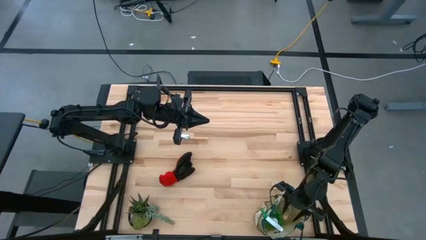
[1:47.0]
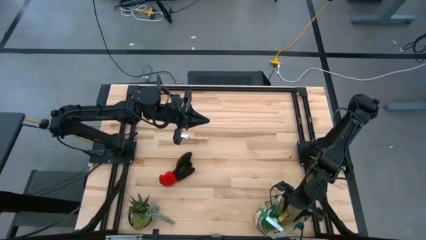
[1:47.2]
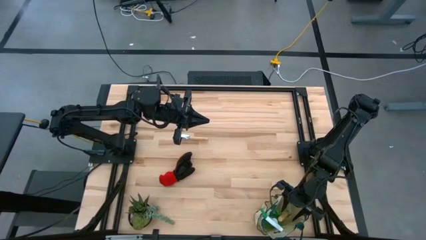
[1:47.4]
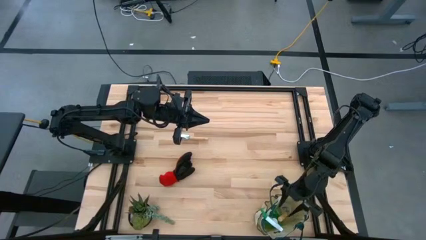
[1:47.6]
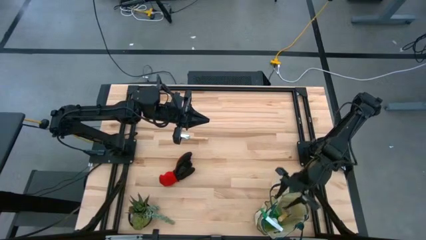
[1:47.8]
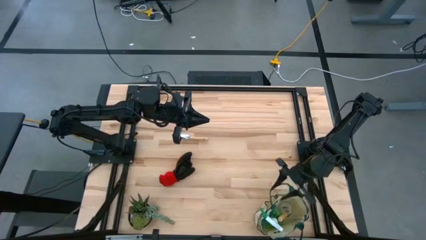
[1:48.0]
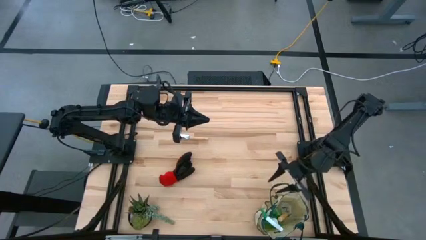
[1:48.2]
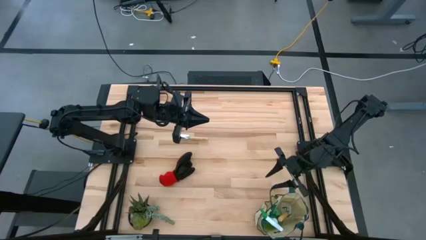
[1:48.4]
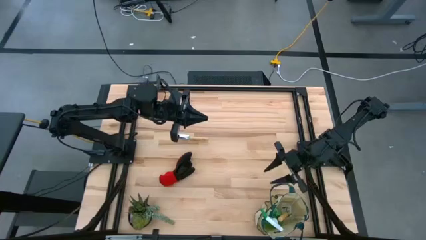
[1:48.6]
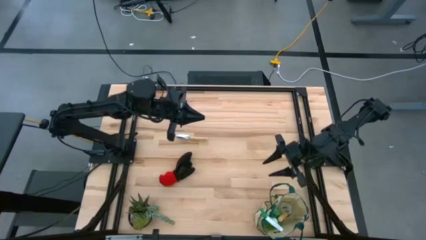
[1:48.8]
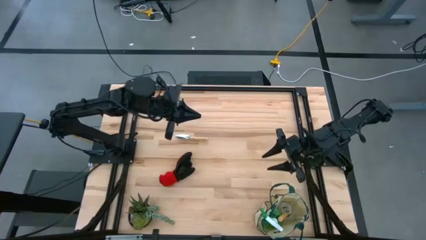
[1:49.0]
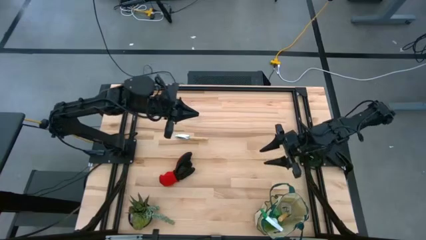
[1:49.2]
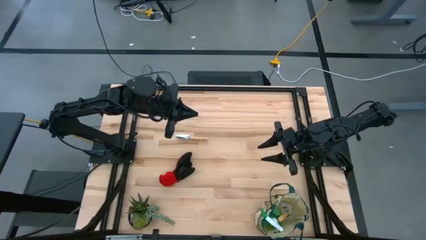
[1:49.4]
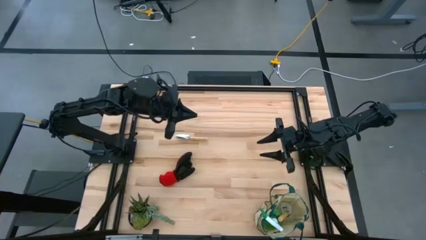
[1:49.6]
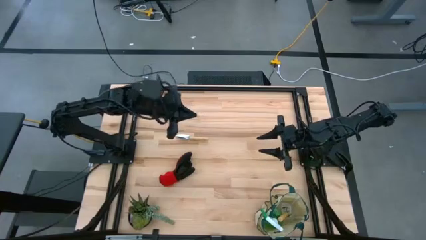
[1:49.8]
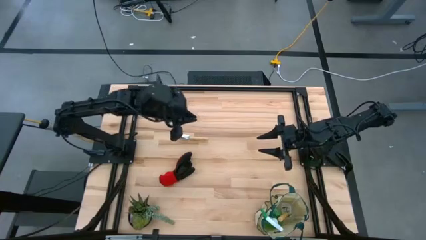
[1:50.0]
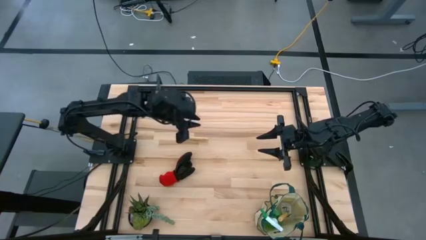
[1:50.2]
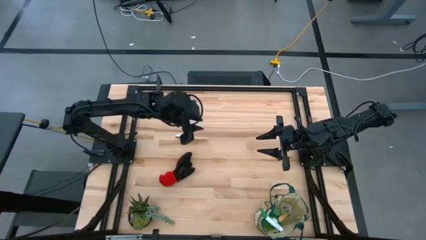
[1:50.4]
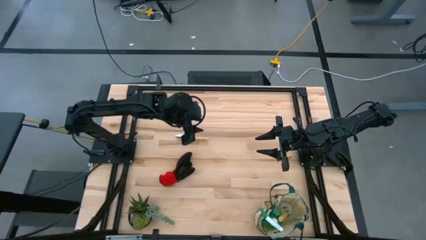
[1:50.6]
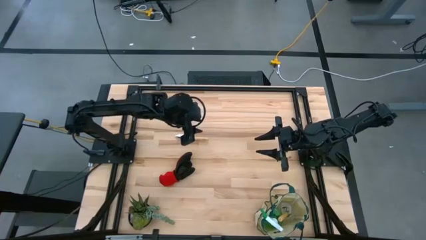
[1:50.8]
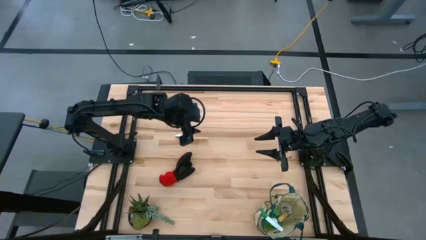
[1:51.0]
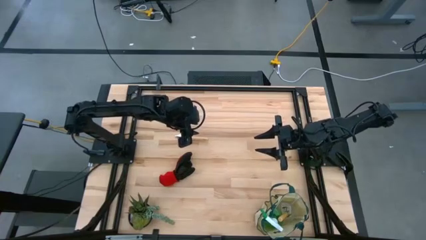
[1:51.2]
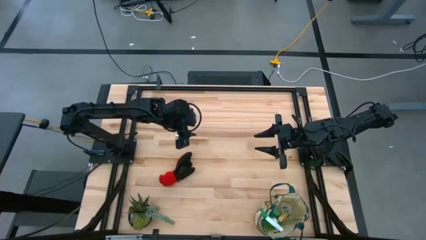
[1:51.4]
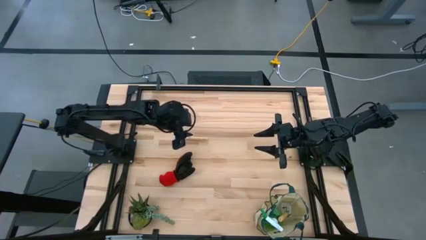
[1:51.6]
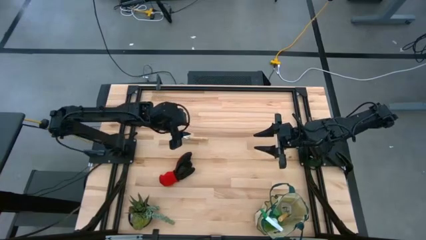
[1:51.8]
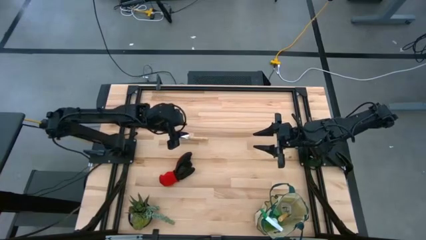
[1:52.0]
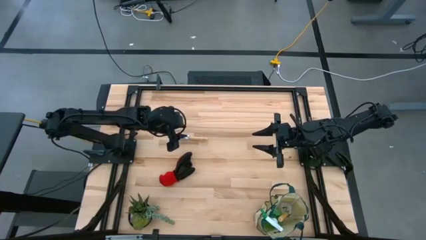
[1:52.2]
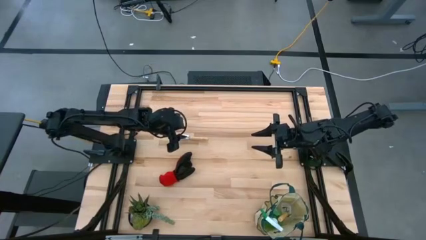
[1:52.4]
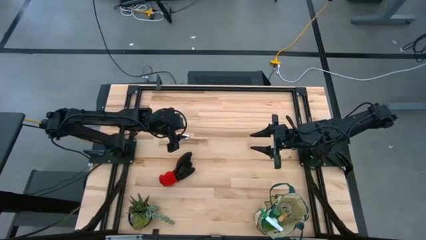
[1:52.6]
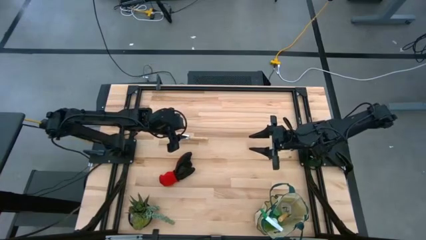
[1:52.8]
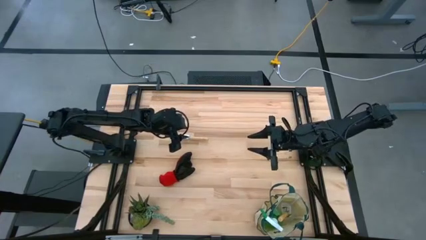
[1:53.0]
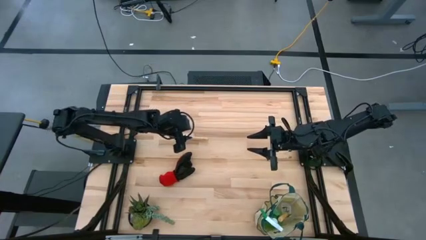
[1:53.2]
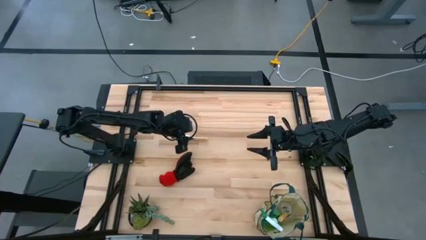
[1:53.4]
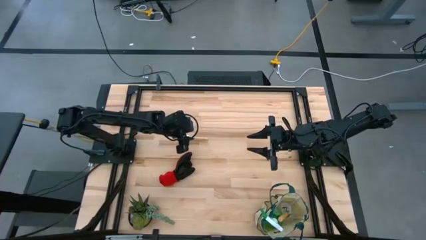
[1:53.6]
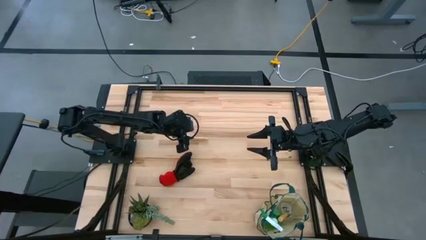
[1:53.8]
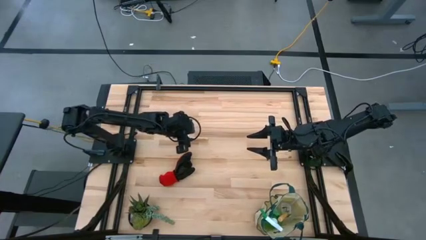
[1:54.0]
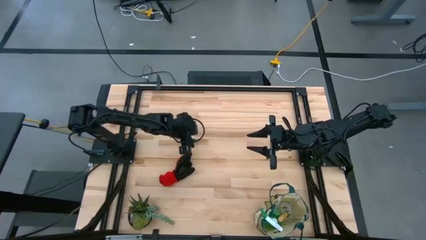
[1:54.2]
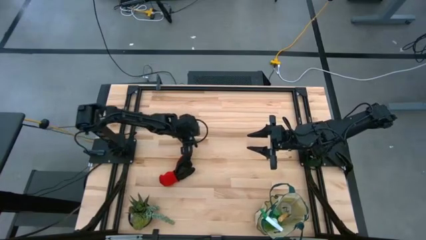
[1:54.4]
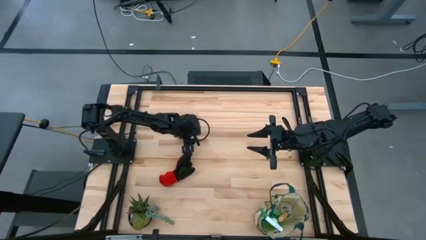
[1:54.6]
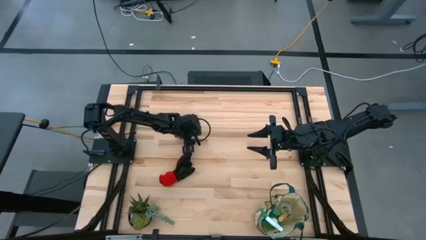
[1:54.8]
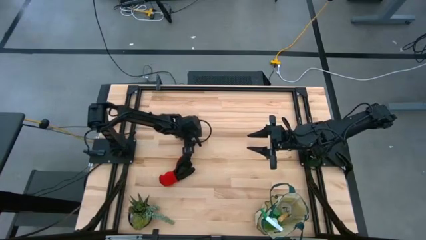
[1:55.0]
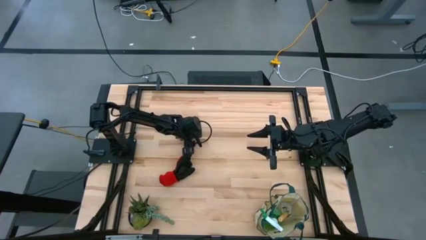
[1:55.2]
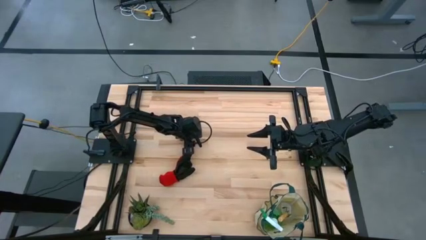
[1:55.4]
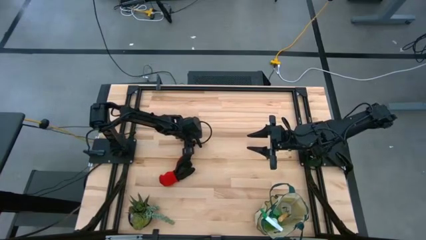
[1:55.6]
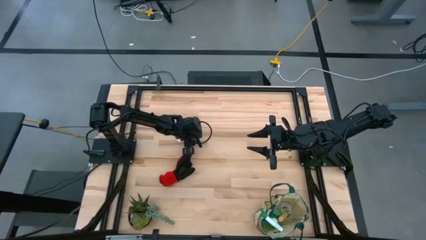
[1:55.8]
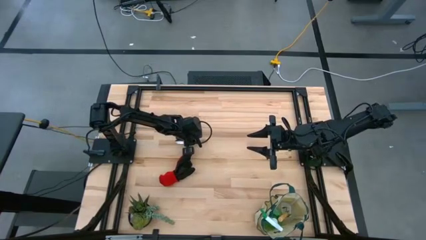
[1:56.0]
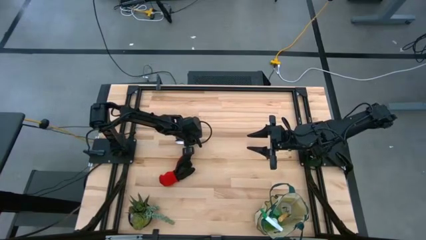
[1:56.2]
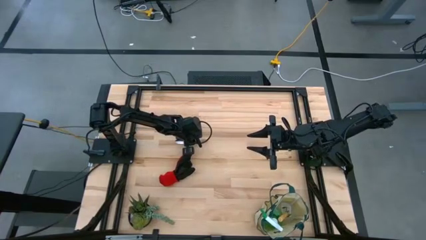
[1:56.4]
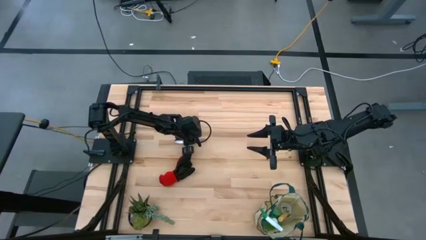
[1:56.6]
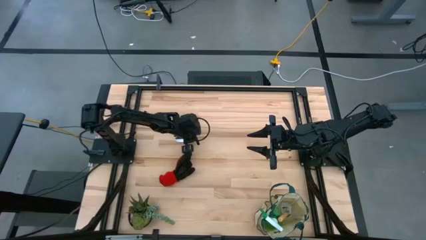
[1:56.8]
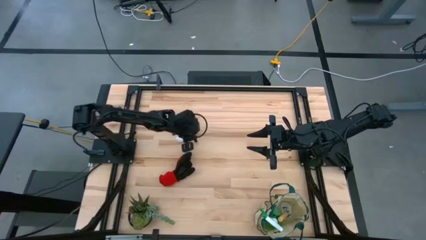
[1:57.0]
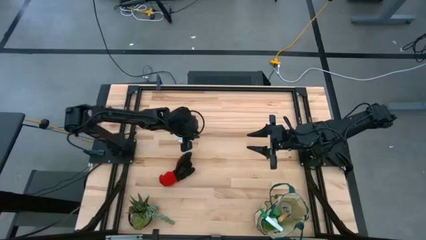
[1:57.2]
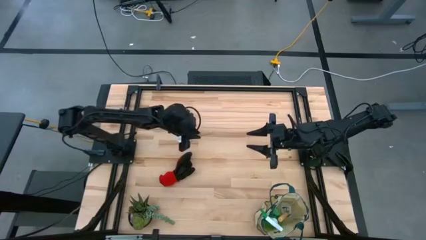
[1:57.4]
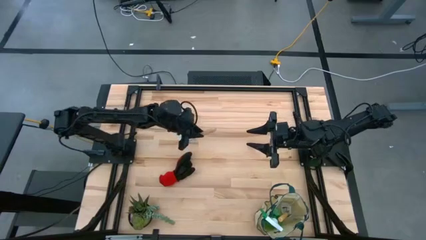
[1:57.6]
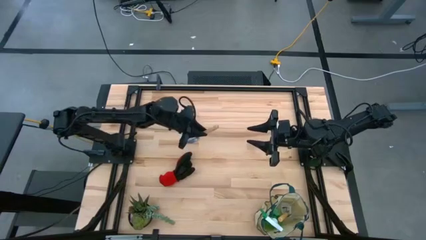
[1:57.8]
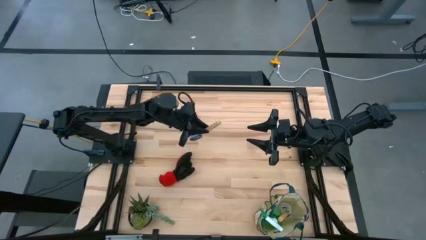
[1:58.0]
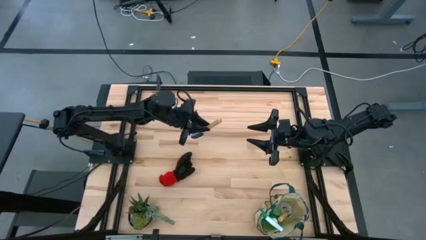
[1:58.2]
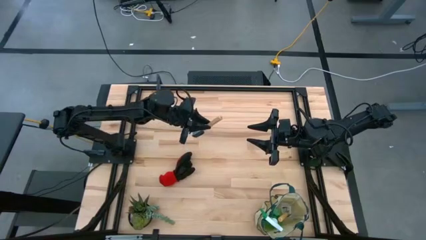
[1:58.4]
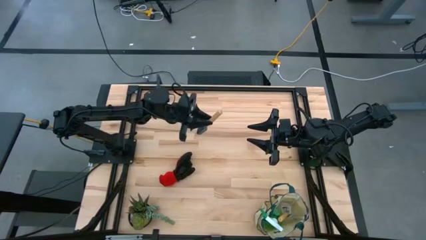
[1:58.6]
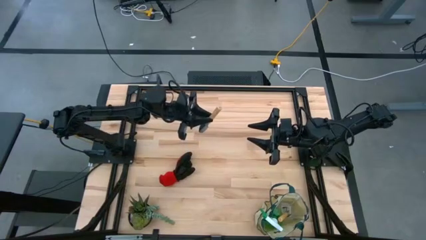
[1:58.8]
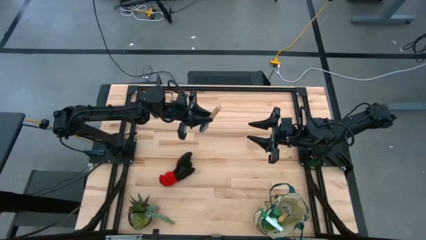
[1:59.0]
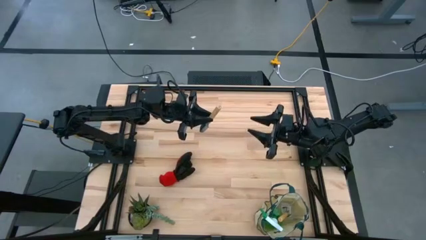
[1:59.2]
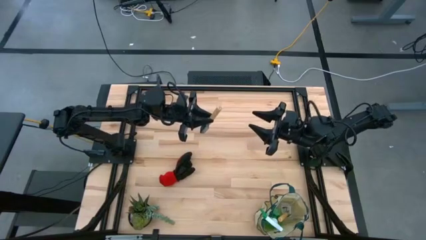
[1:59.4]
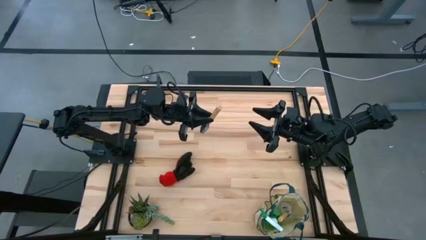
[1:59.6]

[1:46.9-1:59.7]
Task: Pick & Place Garden tools in Gardening bag
Put the brown hand trowel into the gardening bag

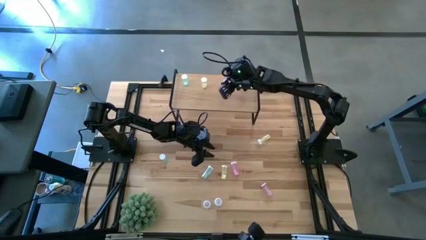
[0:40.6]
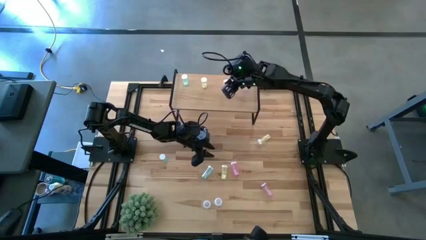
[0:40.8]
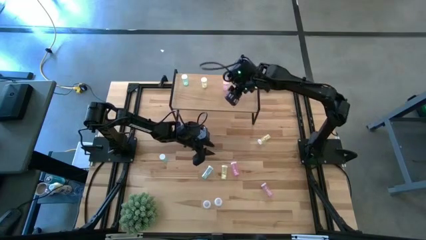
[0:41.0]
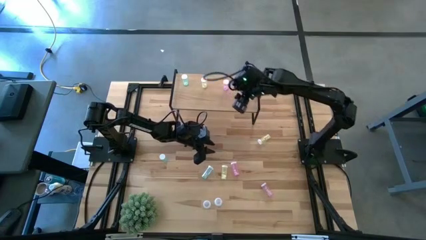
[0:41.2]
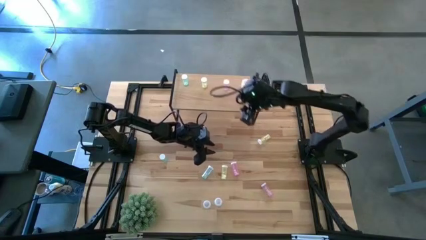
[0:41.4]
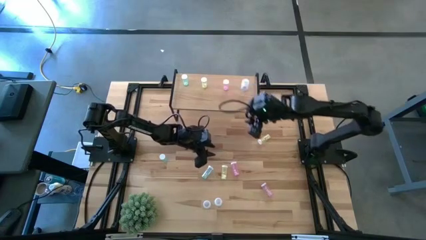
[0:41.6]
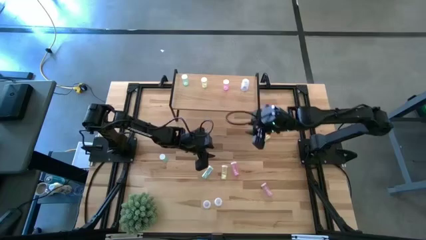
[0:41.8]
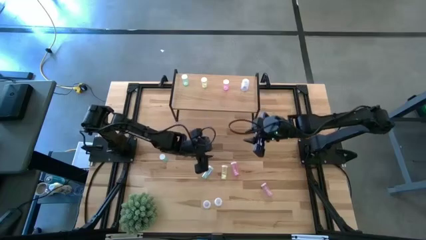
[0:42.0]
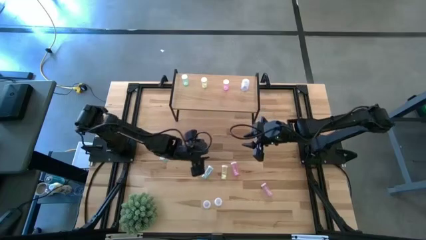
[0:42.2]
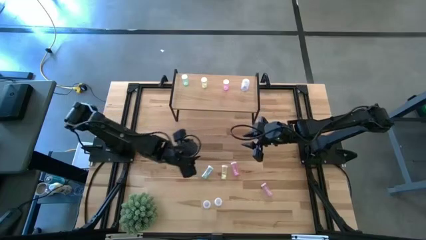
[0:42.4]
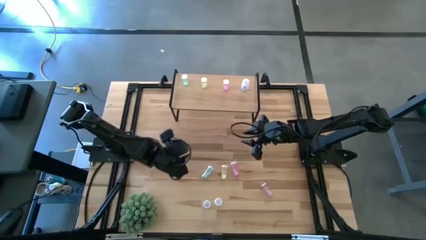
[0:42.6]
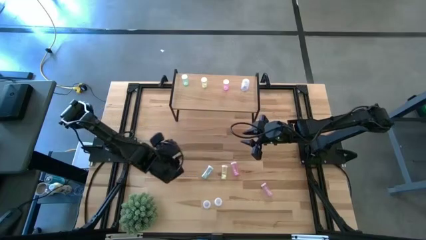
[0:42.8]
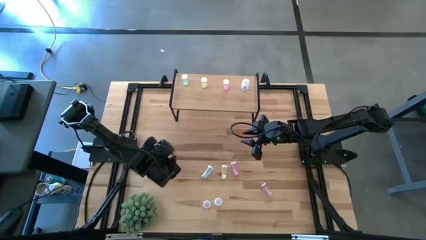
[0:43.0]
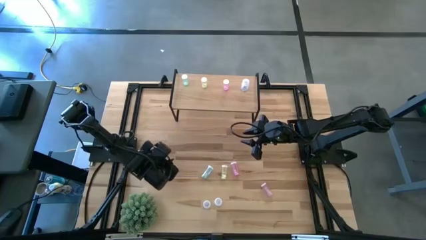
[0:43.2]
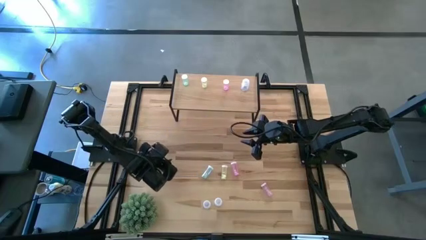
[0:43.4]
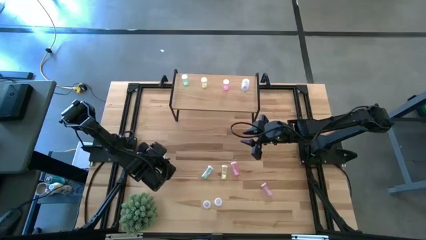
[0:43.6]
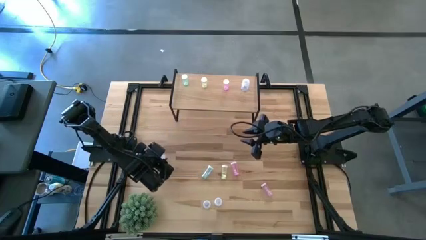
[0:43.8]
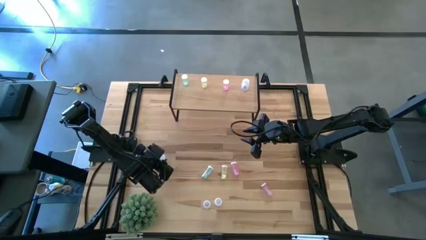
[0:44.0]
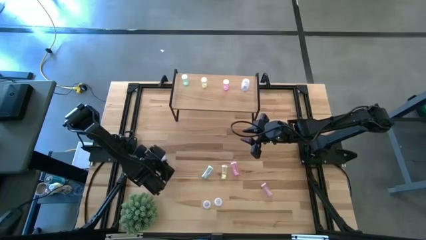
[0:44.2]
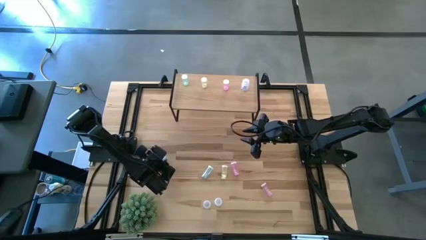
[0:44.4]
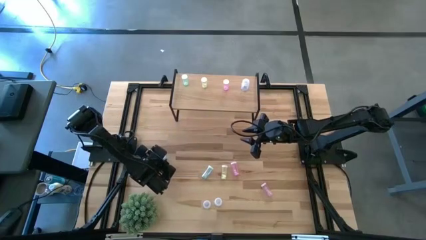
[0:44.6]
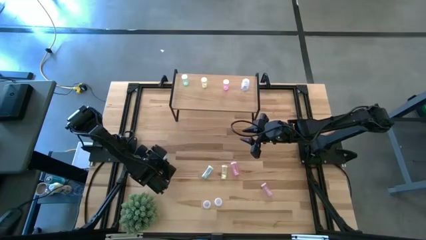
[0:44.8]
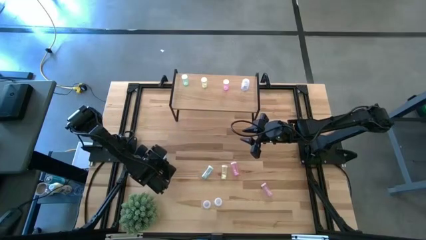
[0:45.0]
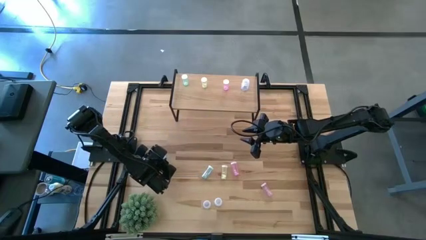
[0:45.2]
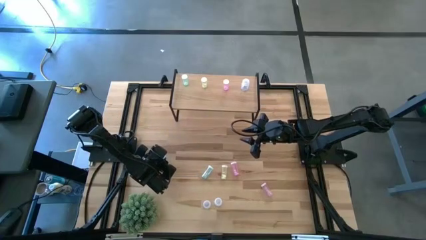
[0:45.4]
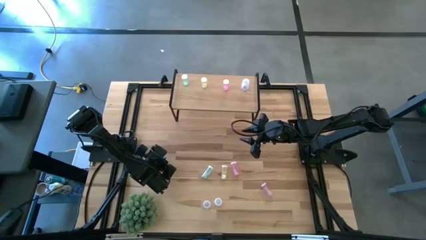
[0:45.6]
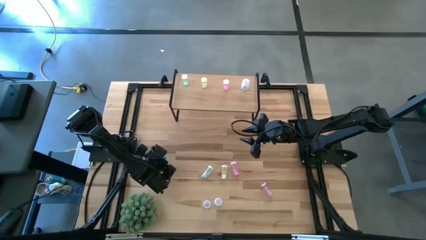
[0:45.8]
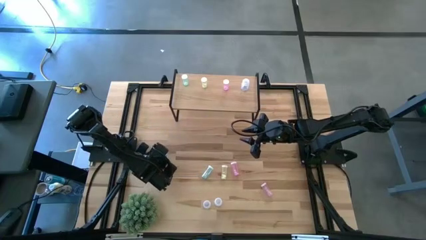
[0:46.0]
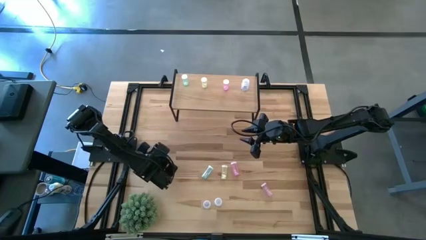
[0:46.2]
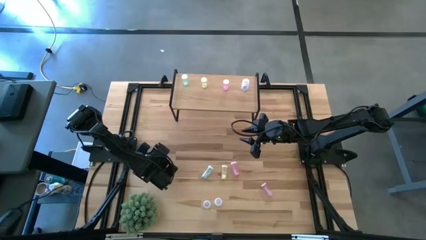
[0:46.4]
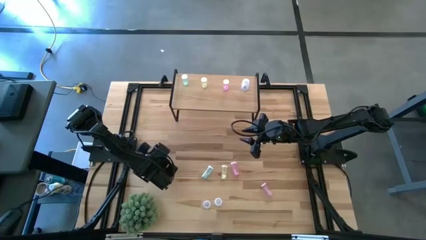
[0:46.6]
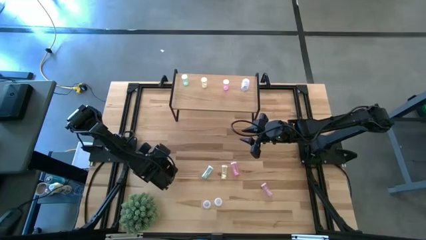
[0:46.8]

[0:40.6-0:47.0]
Task: Pick and place medicine bottles onto shelf by color
Put the left blue pill bottle on the shelf
